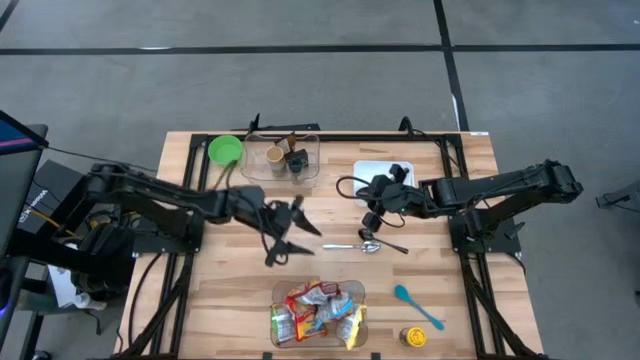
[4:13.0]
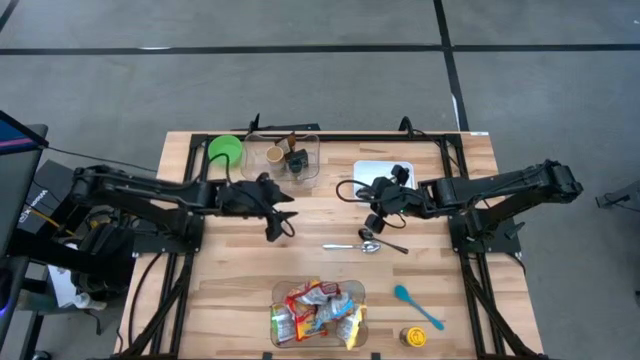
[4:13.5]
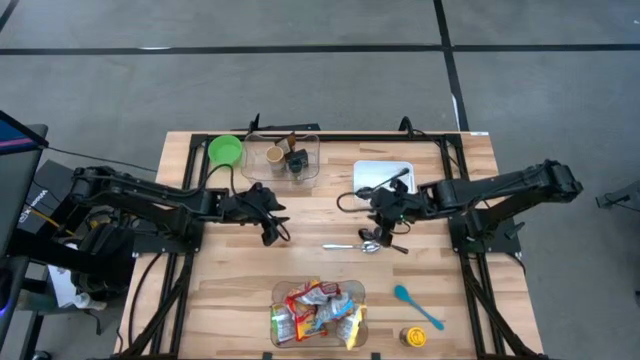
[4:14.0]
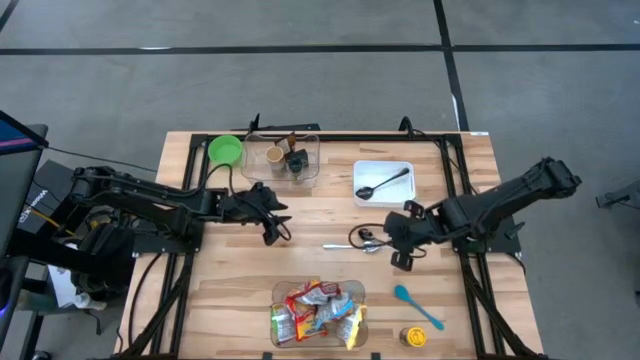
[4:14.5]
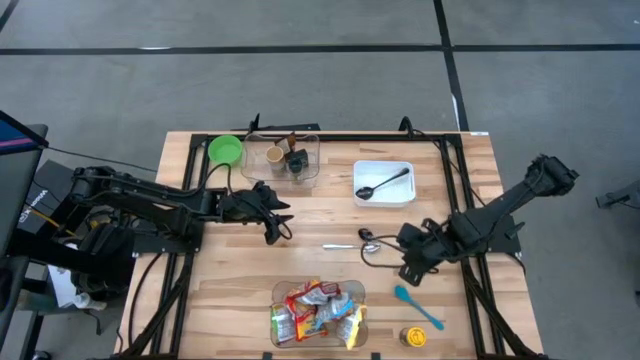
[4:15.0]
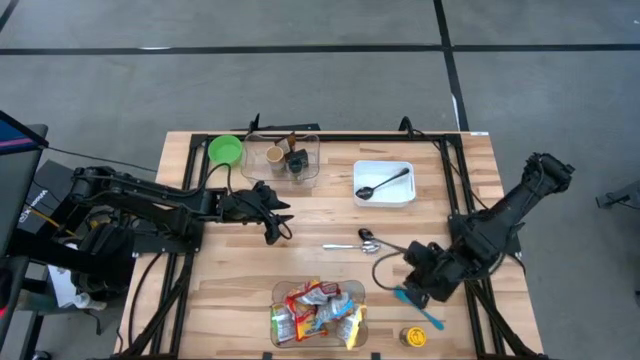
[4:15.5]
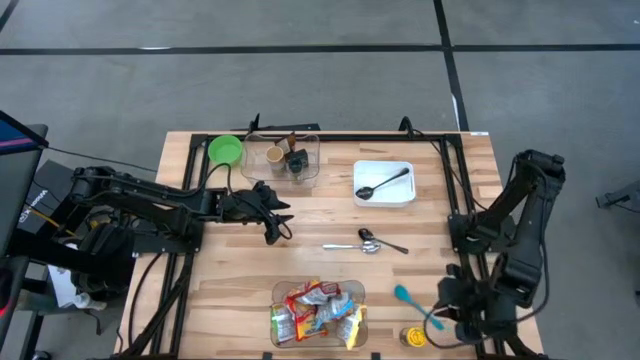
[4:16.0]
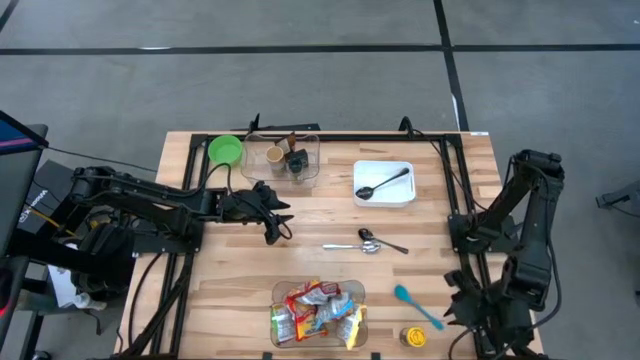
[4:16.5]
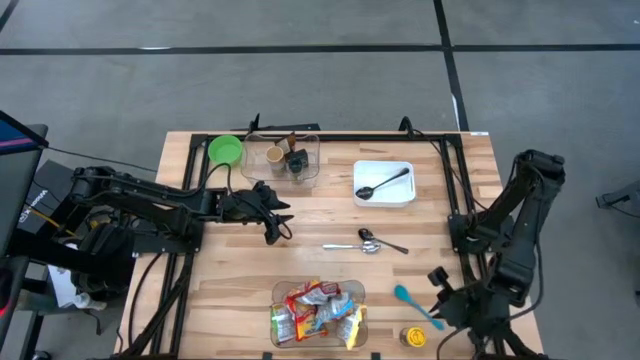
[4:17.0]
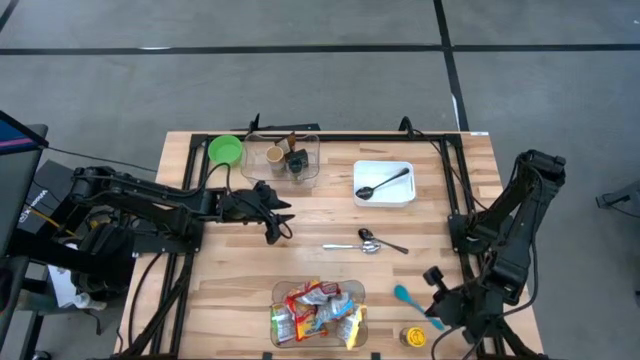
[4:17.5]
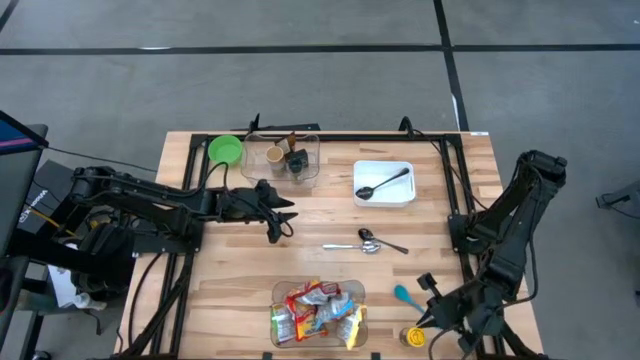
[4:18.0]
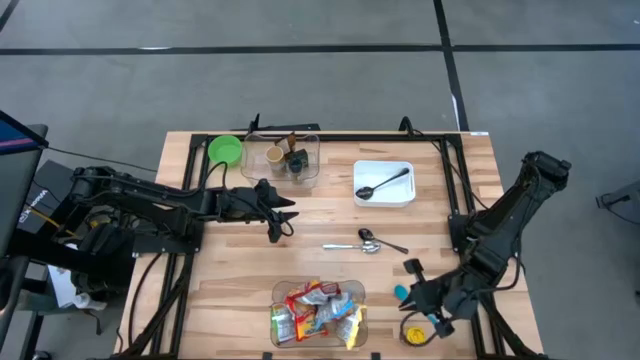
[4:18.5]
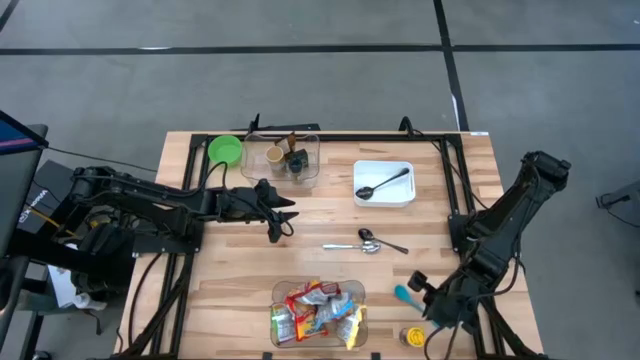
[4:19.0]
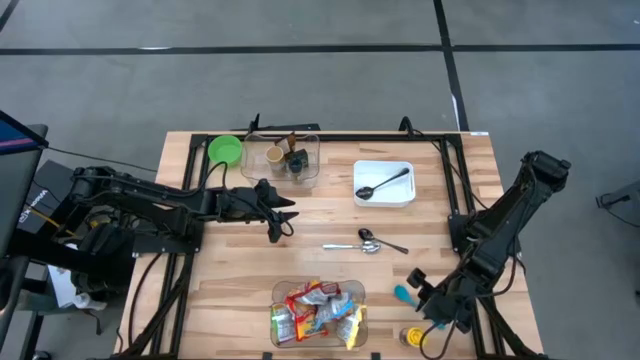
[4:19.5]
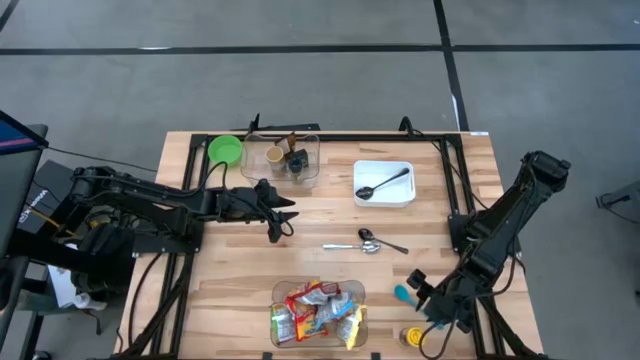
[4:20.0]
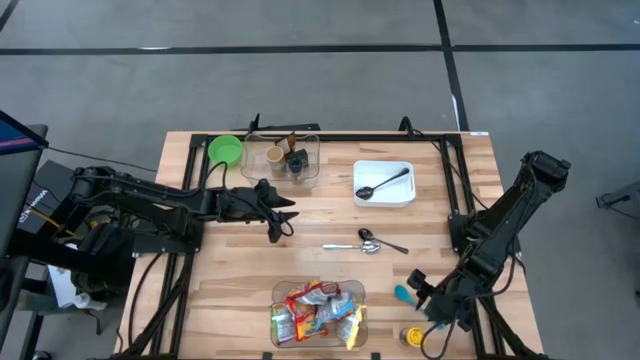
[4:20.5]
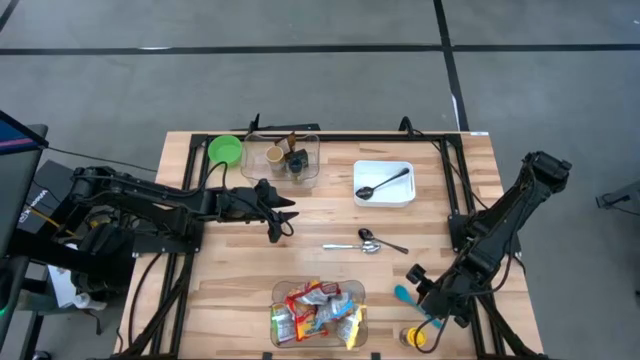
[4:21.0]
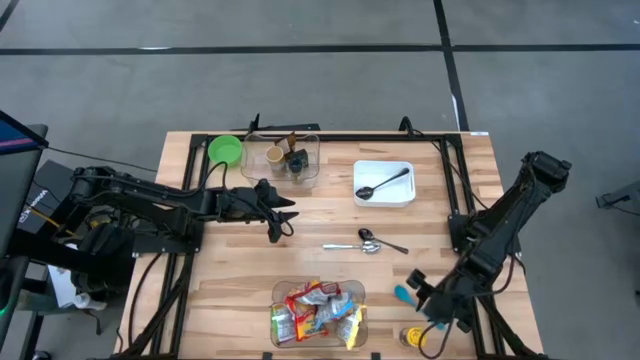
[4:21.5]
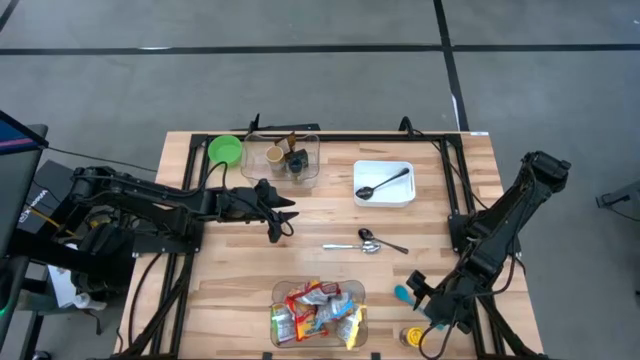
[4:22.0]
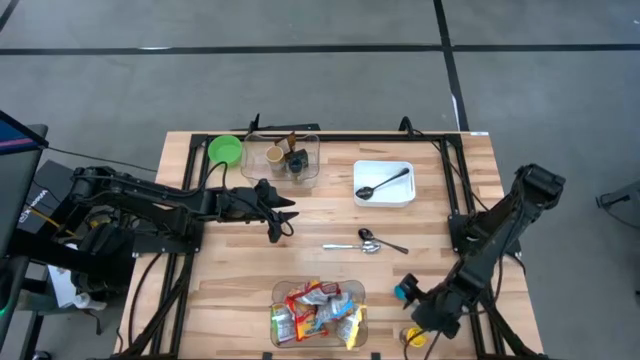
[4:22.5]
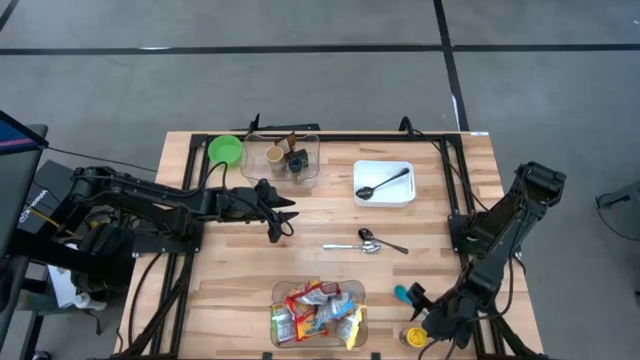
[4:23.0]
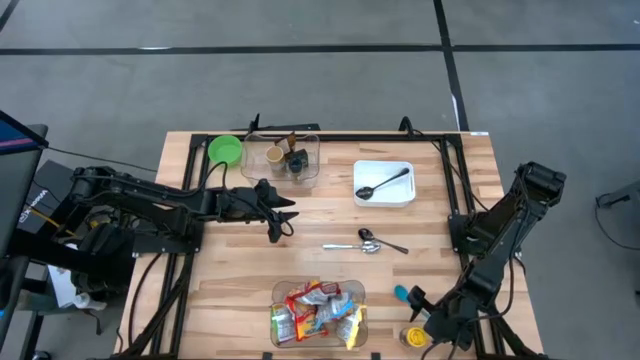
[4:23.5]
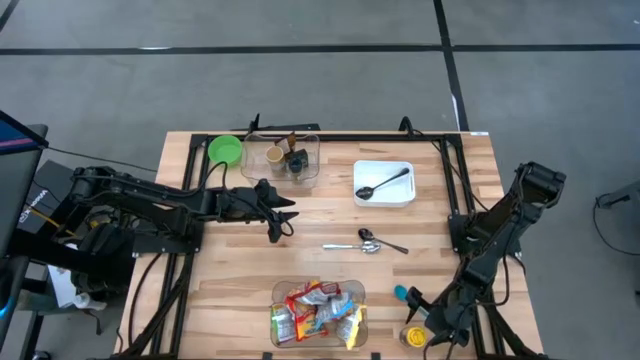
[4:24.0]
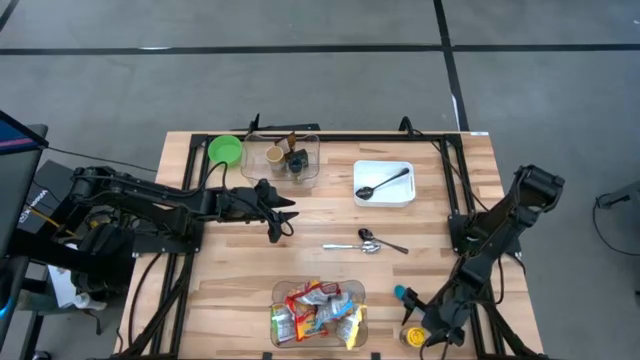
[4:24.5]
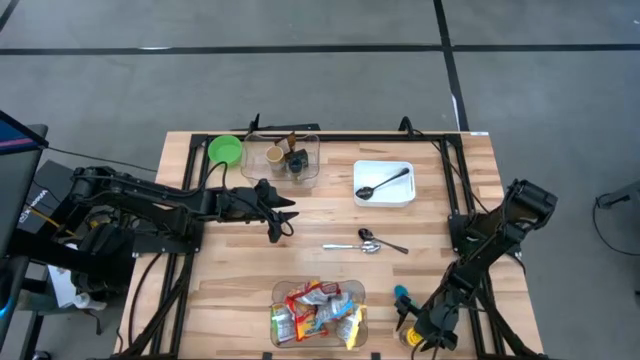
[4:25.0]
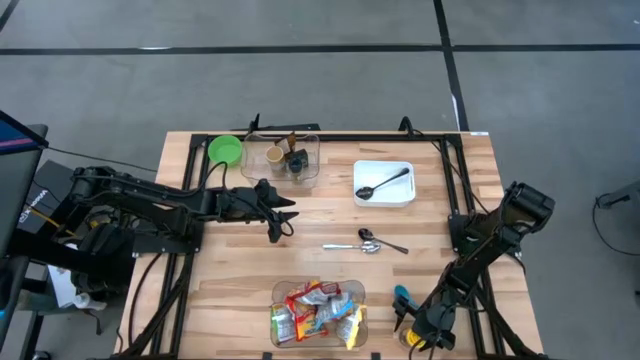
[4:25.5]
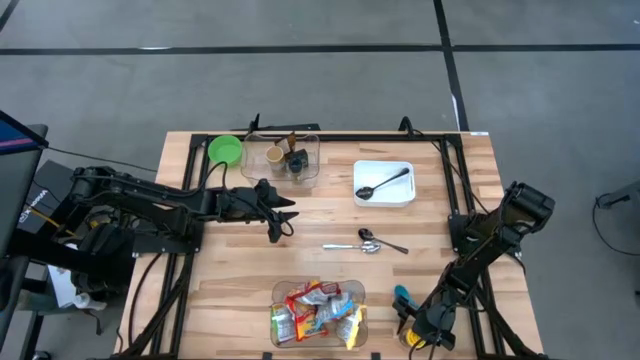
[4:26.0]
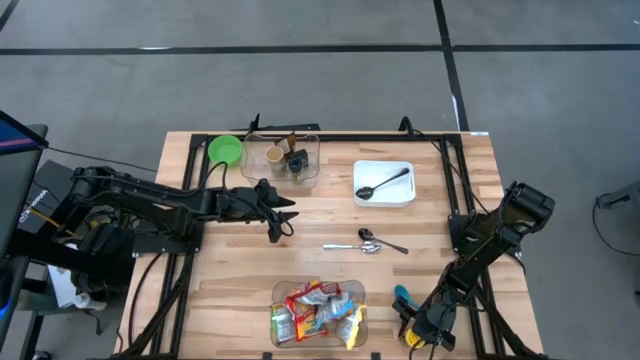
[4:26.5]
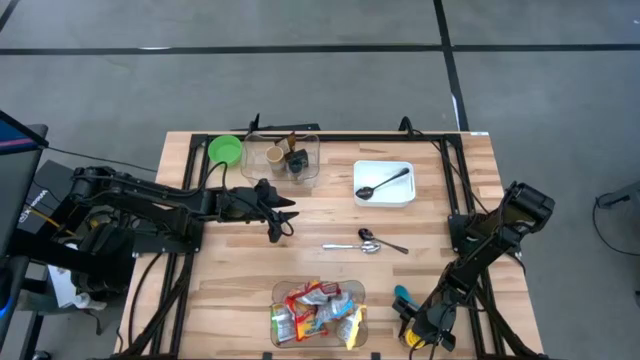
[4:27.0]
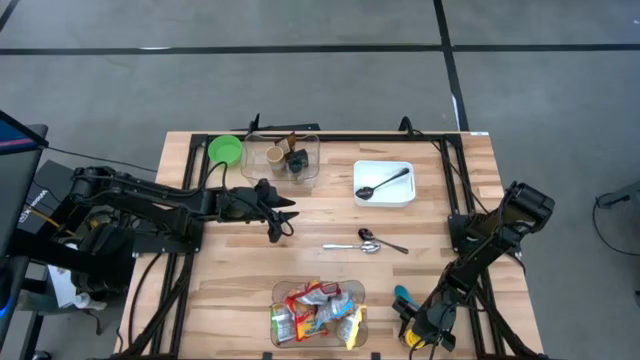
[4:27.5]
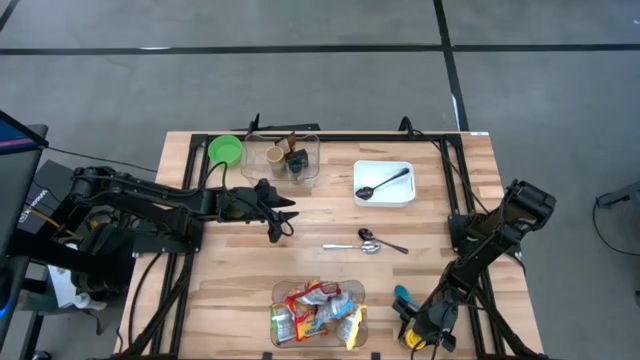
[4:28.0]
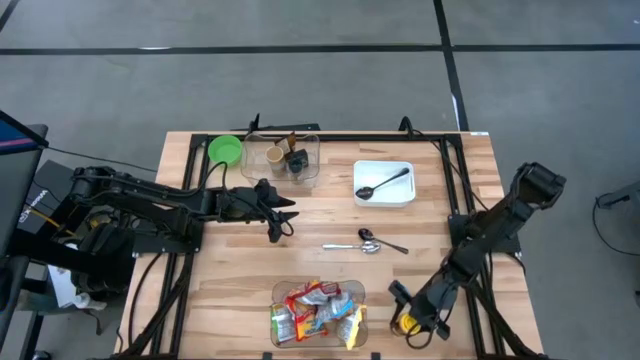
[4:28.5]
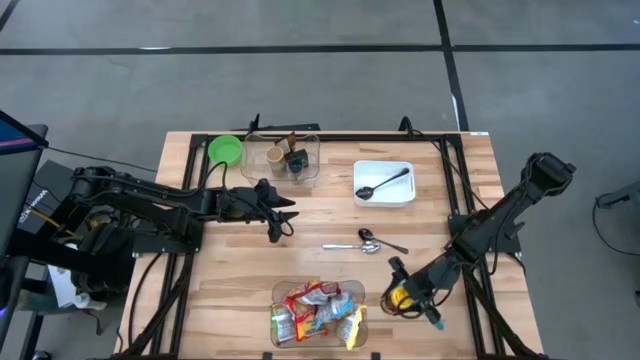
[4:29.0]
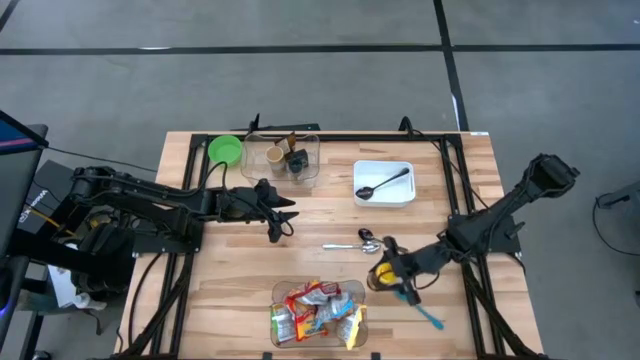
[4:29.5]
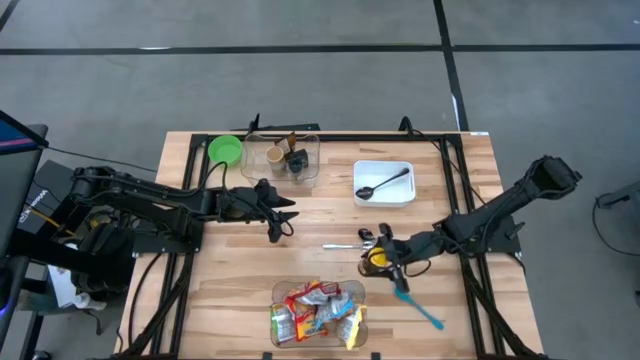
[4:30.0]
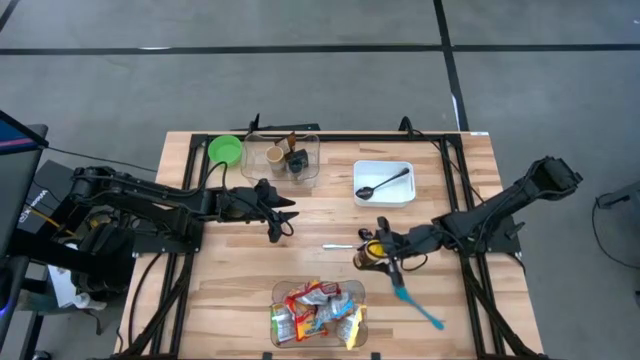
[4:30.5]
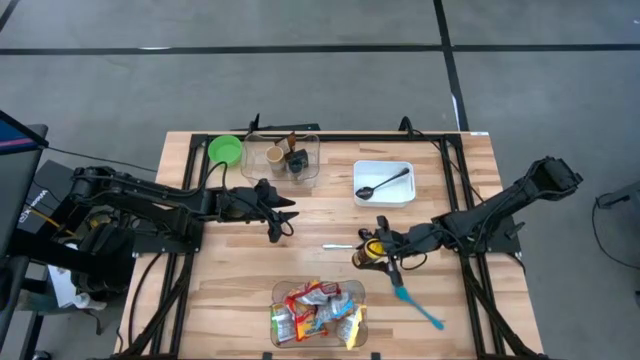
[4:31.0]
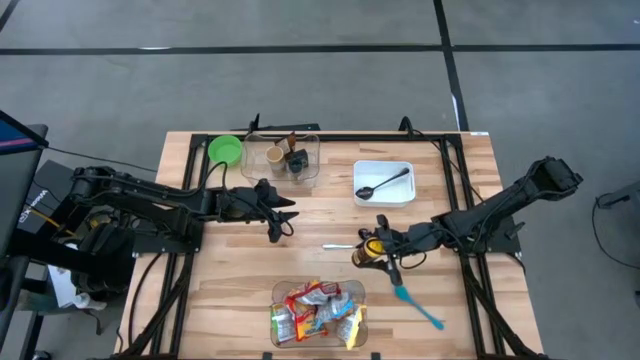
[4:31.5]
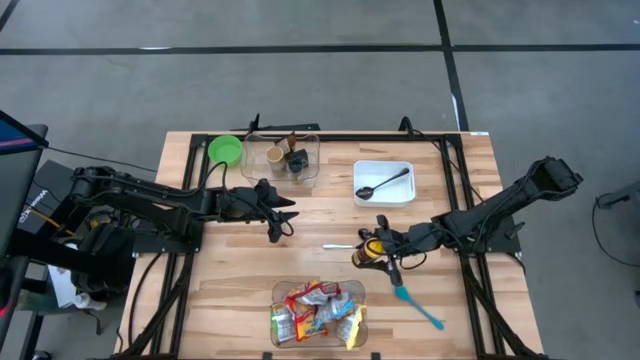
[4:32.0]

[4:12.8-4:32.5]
Task: Pick & Place Food Item
Put the yellow seasoning bottle into the top transparent bin

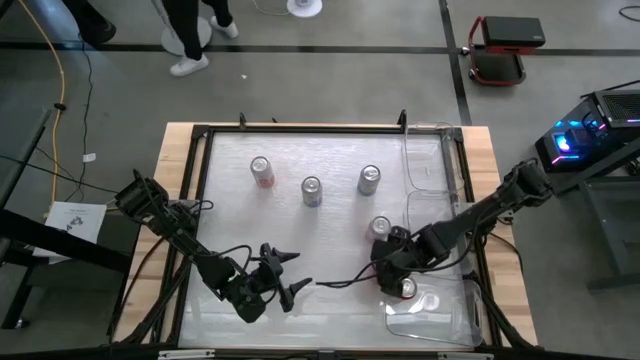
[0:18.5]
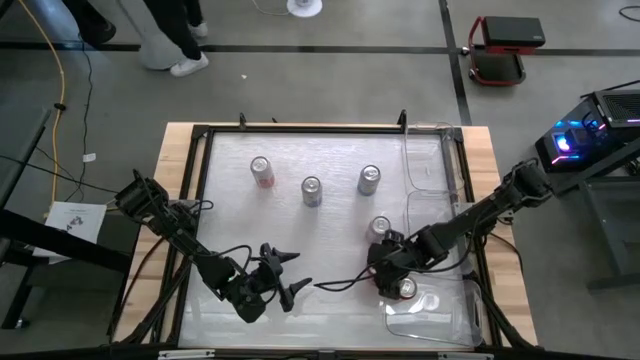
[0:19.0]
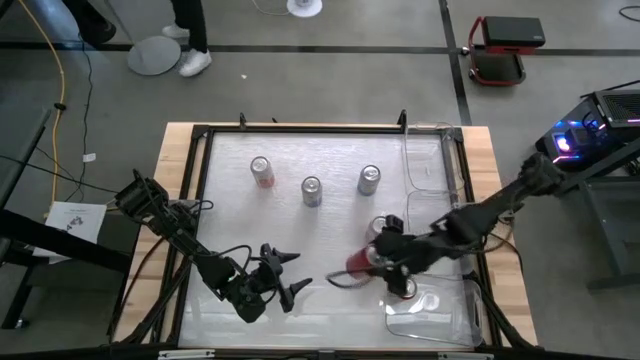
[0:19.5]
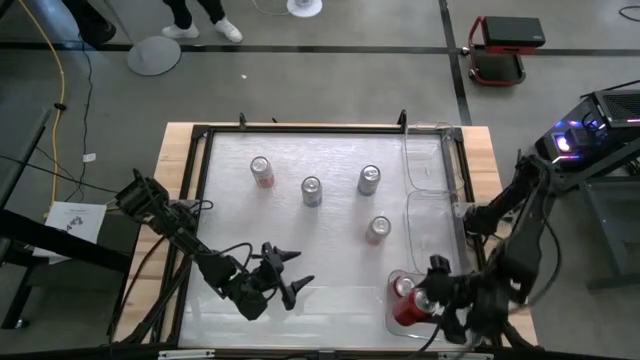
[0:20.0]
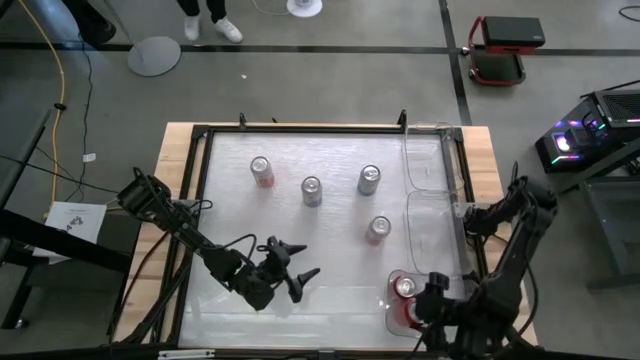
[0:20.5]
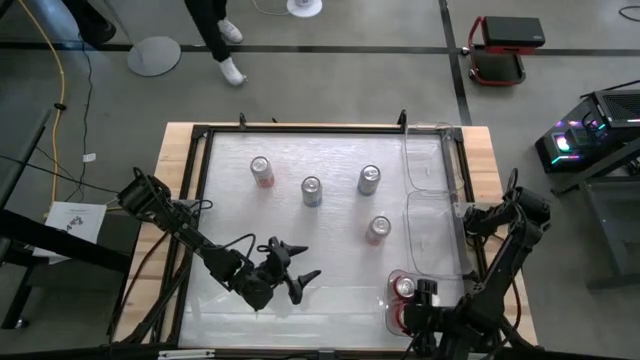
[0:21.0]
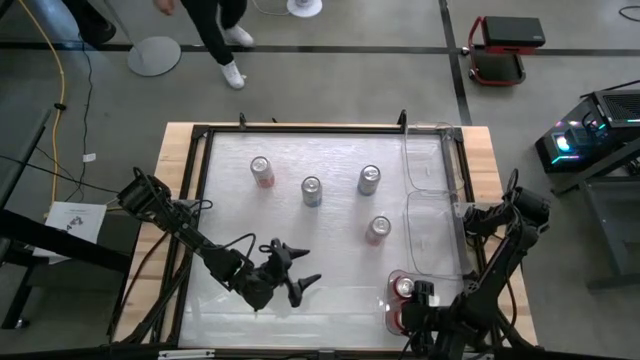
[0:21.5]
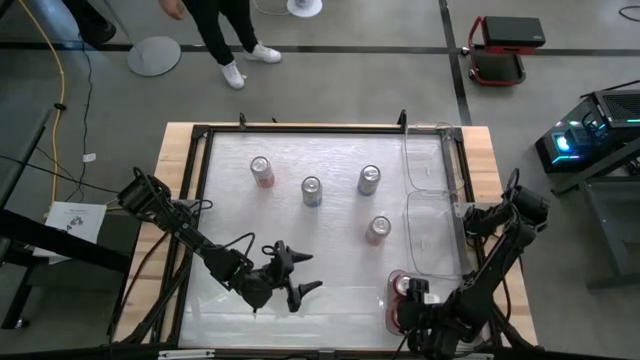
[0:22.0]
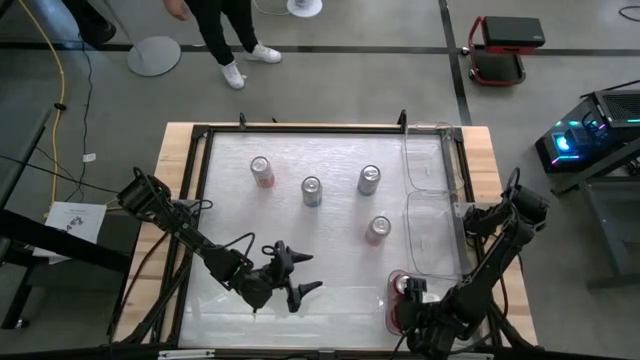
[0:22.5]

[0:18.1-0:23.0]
Task: Sort soda cans
Put the red-black soda can into the bottom transparent bin
